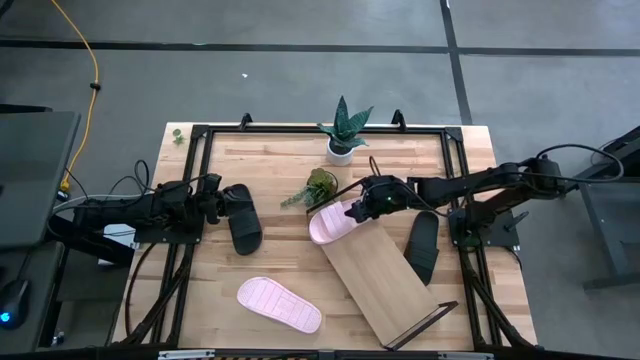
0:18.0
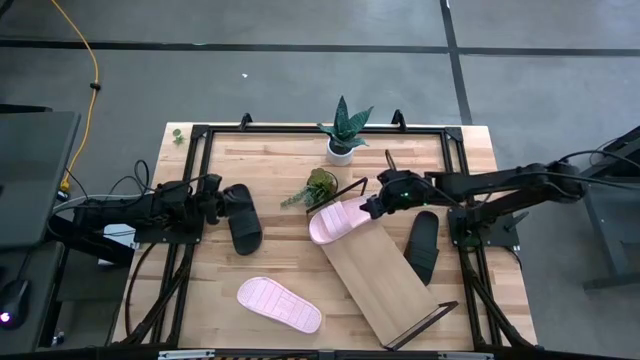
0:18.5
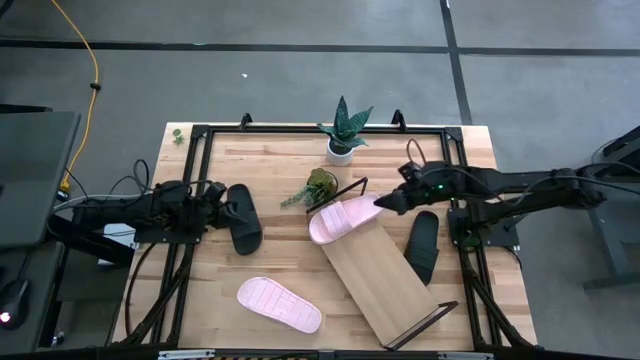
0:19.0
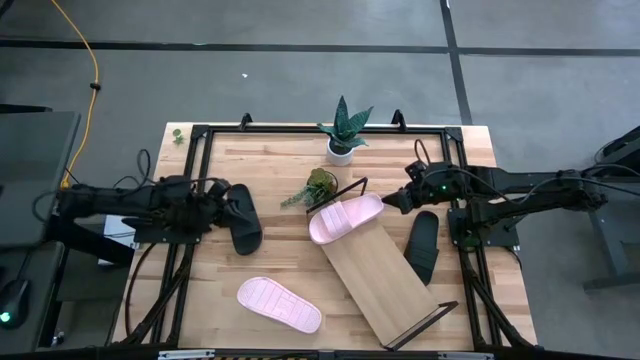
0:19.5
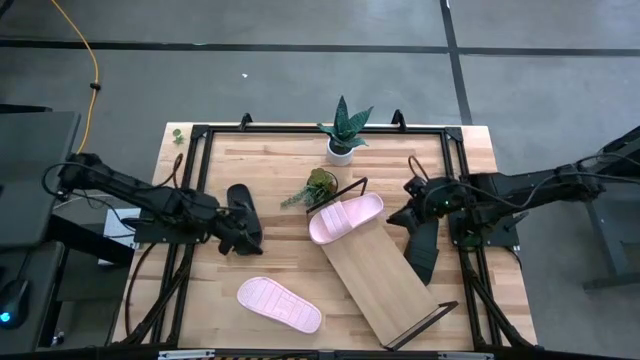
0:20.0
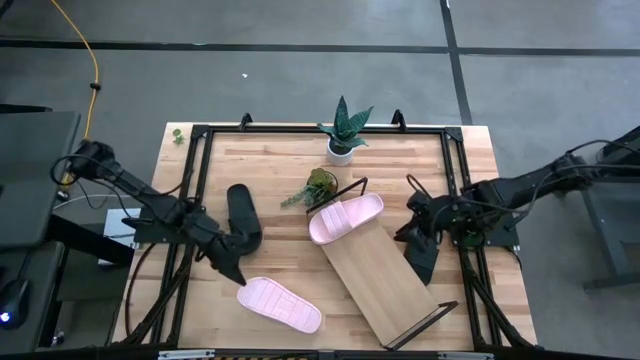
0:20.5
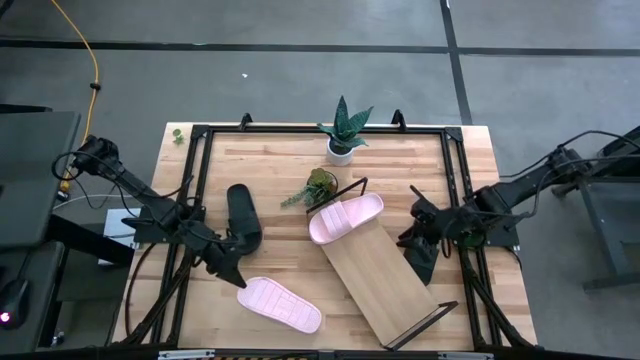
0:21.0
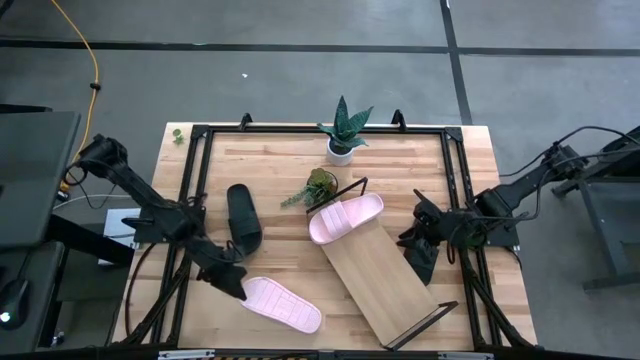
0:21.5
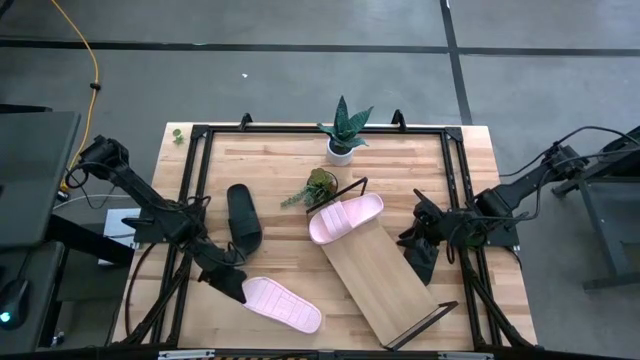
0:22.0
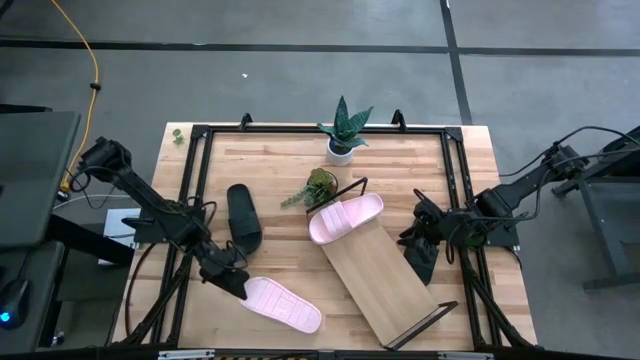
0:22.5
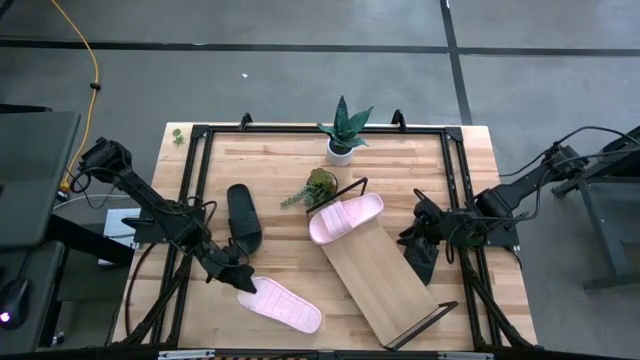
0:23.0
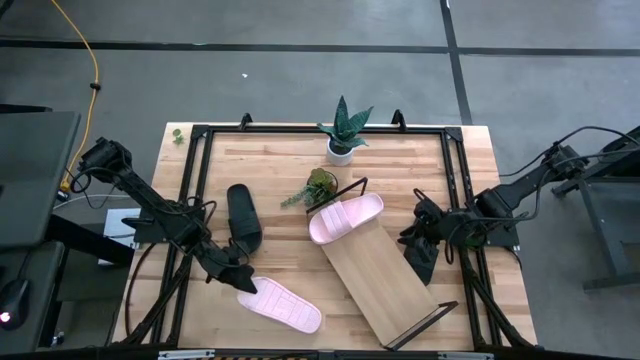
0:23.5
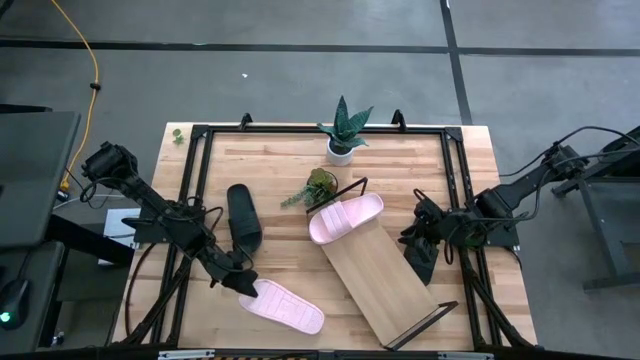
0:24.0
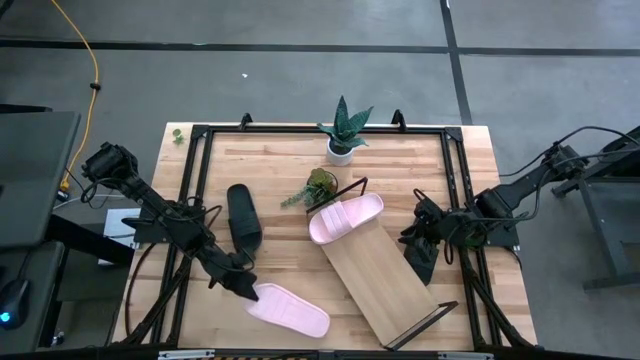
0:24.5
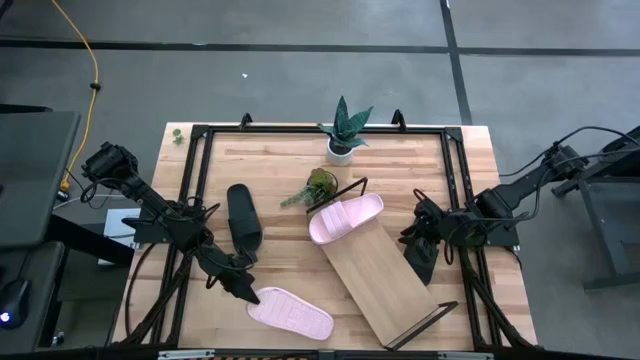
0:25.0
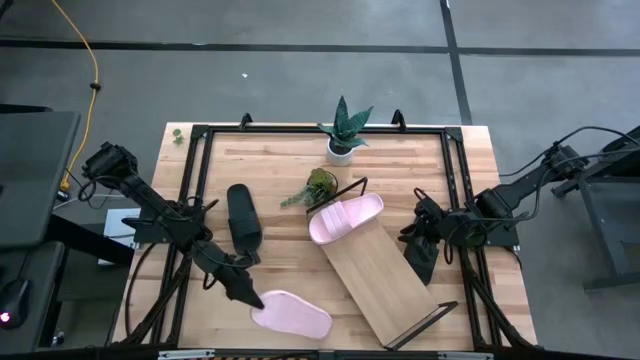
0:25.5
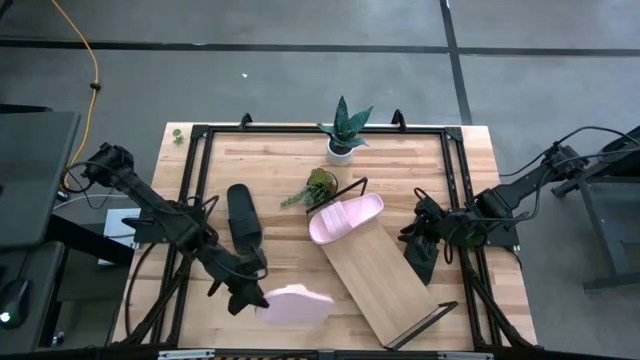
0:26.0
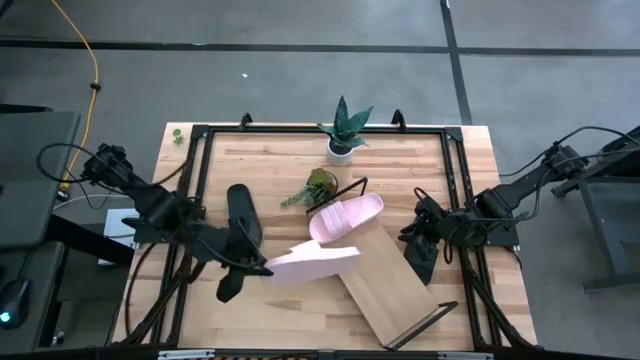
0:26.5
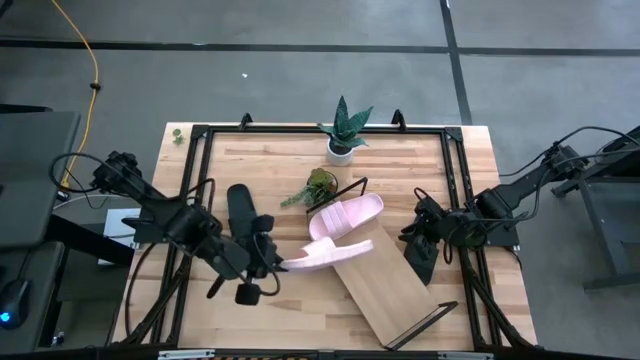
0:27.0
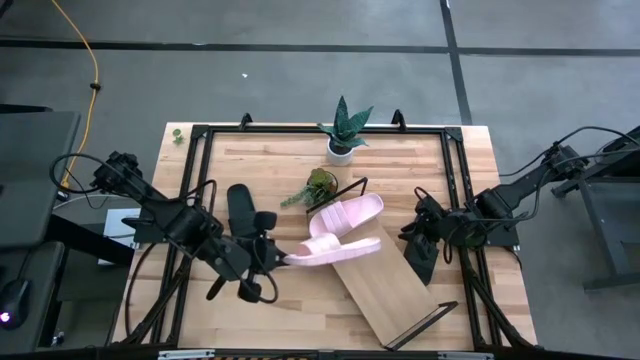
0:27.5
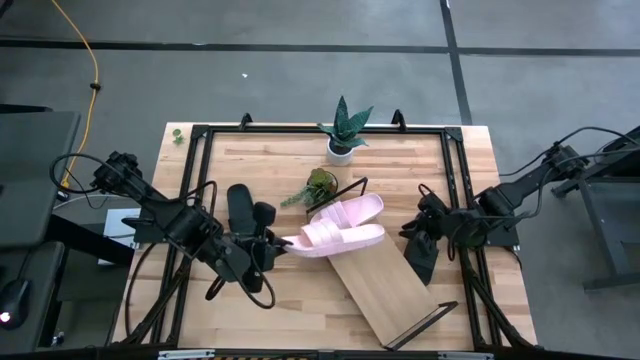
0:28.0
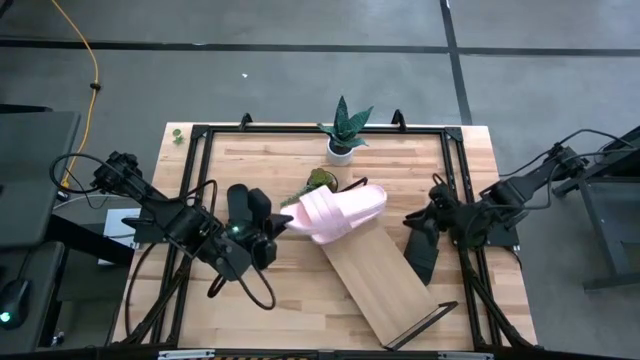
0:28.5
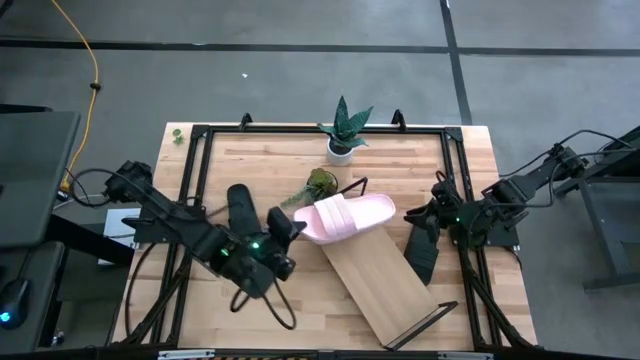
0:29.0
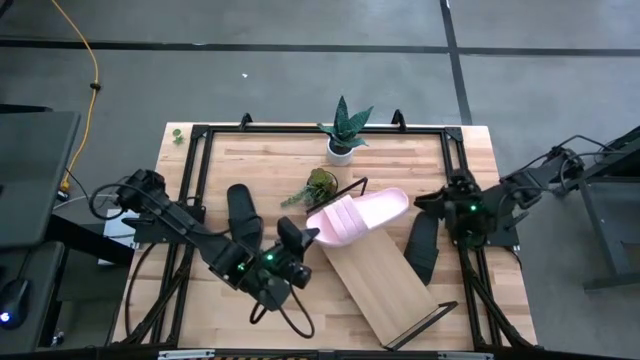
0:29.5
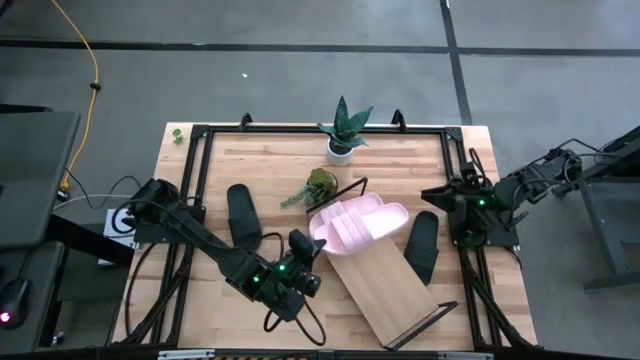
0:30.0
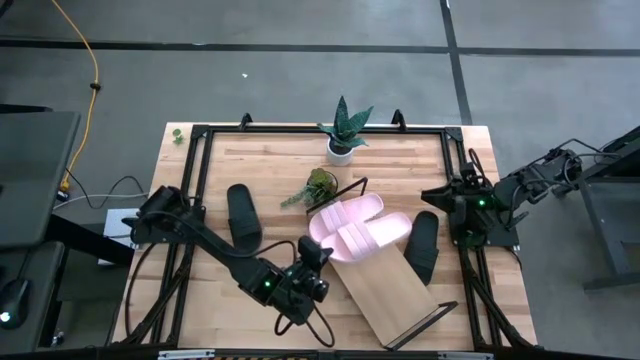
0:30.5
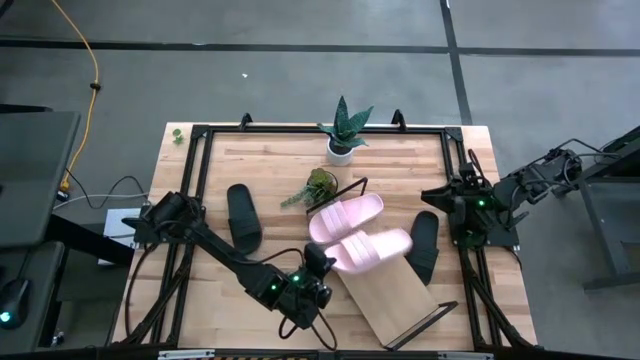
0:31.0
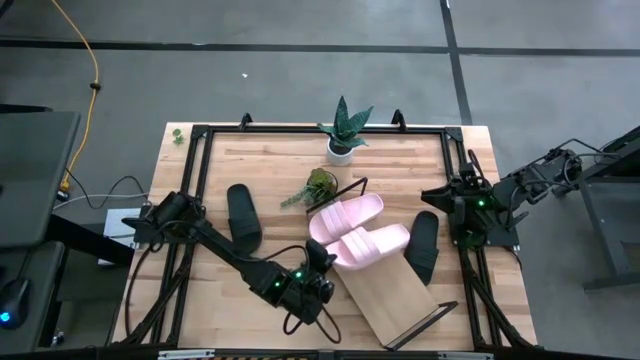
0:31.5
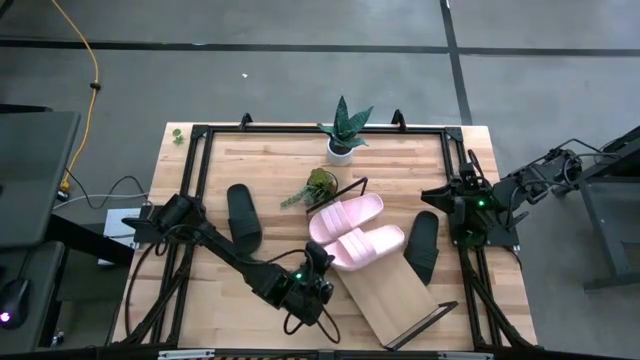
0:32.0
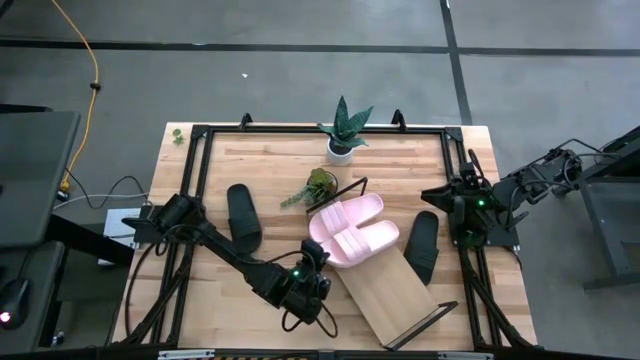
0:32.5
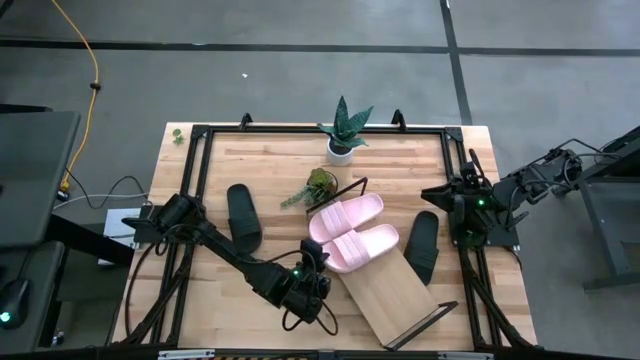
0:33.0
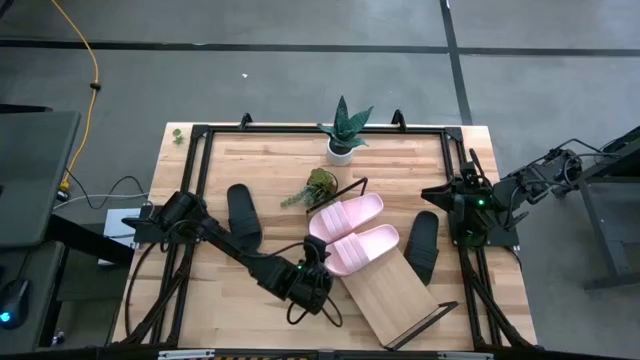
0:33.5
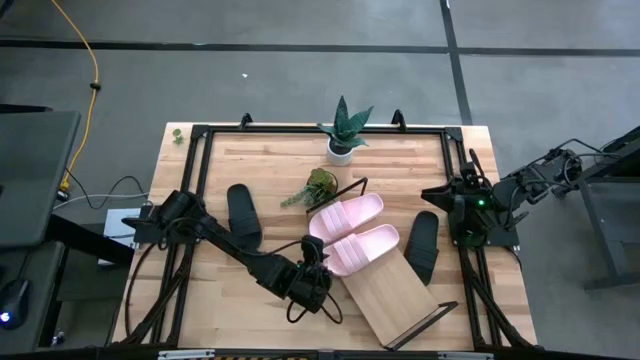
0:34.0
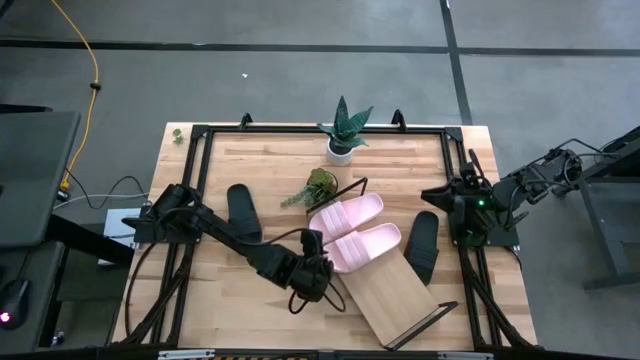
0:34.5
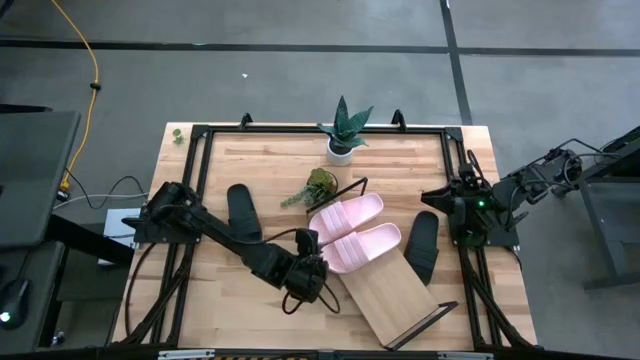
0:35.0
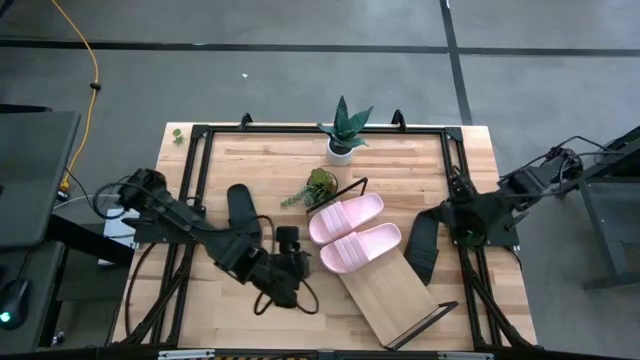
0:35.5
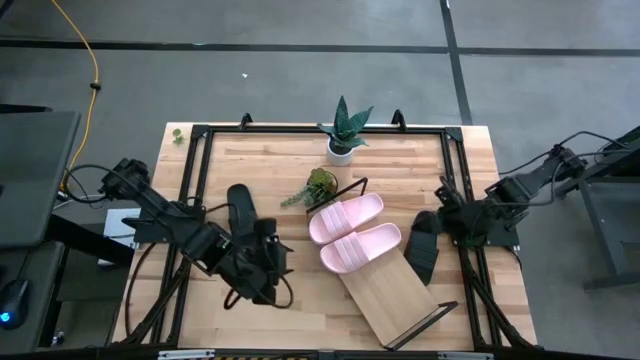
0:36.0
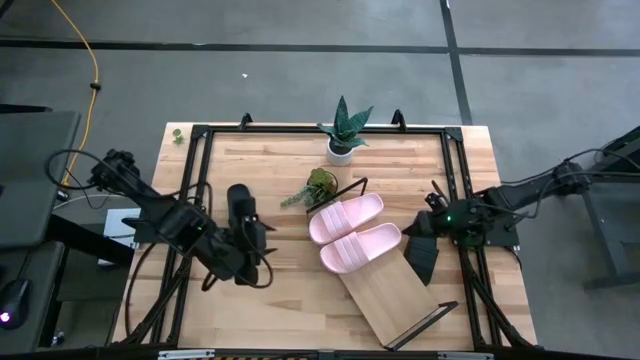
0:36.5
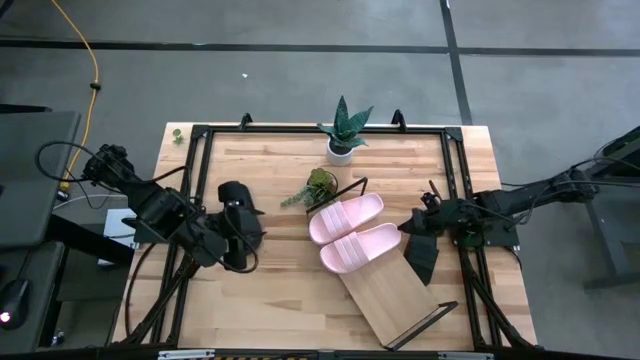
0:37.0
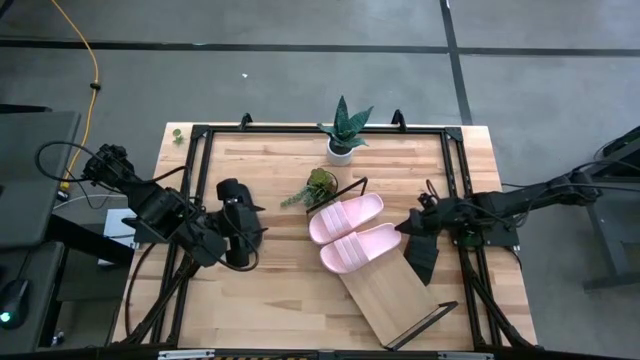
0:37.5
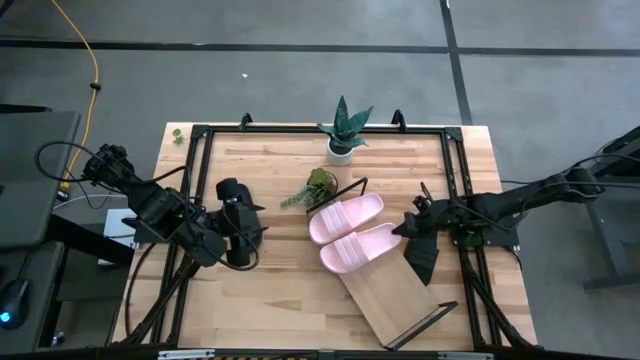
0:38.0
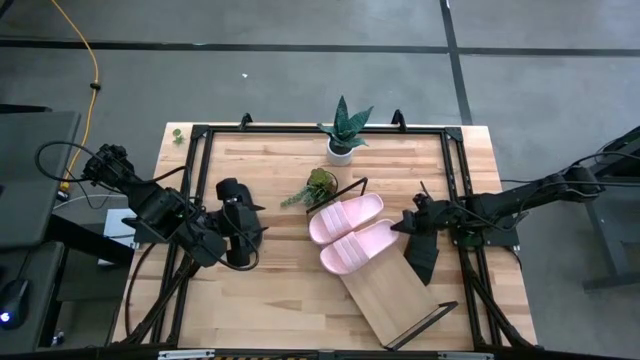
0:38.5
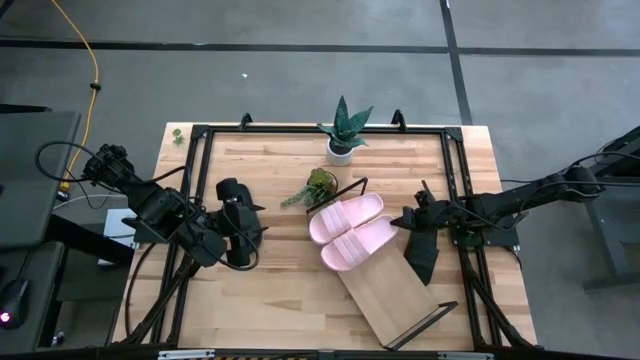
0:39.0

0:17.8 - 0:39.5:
Task: Pick and place slides into the shelf
Put the pink slipper on the shelf
